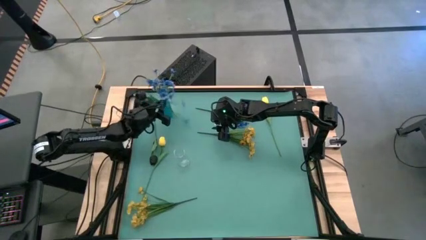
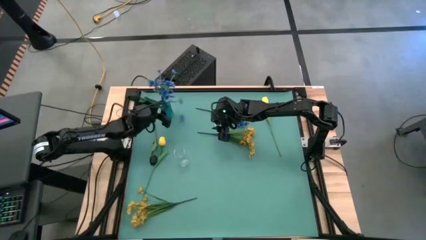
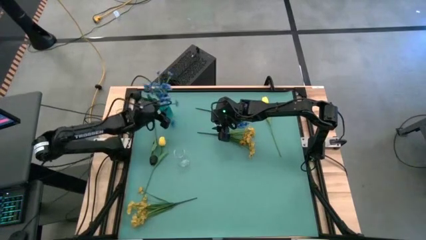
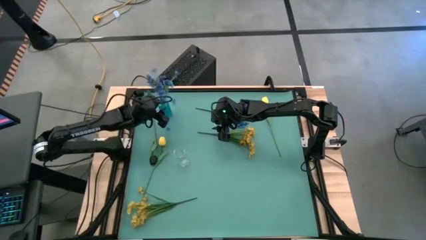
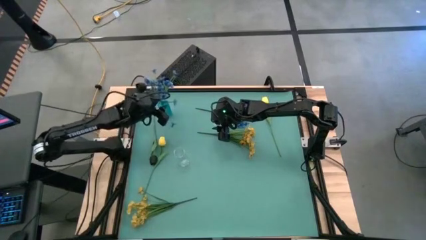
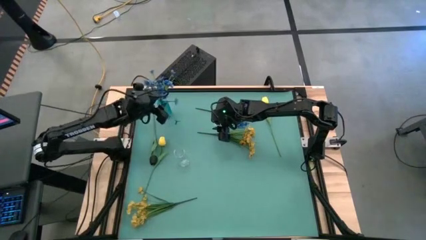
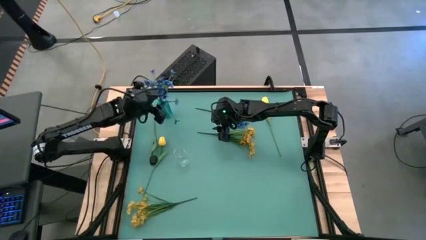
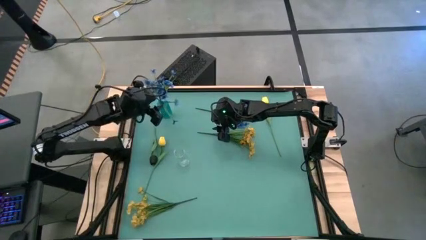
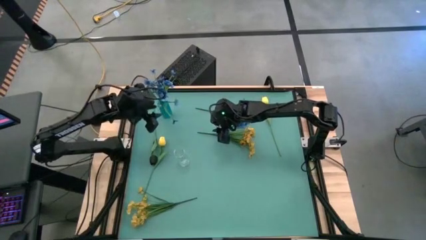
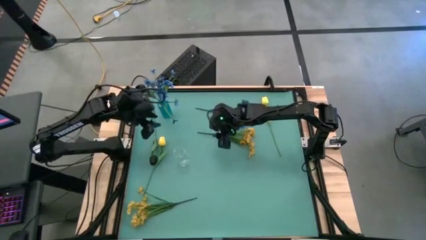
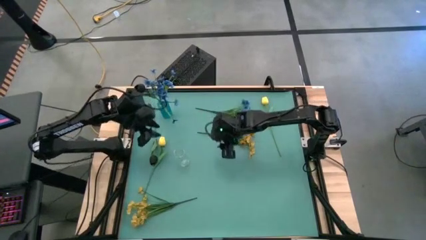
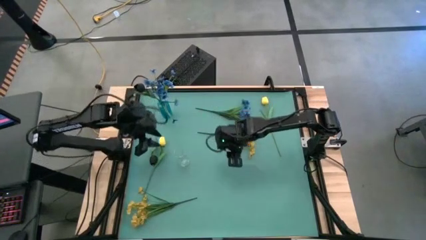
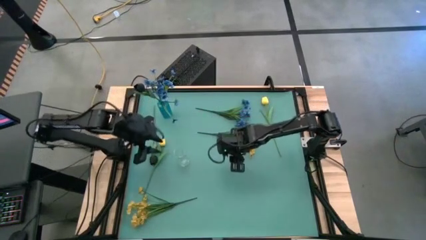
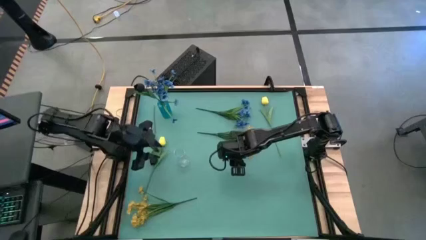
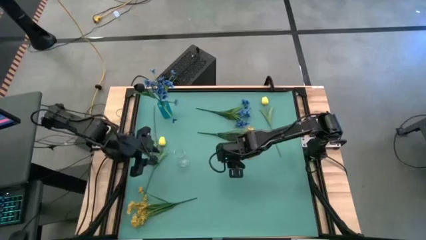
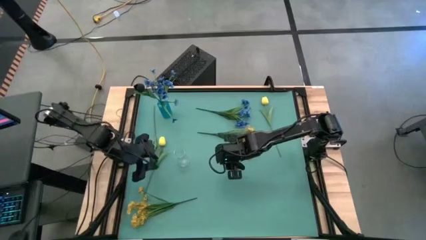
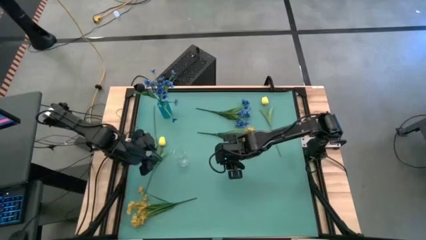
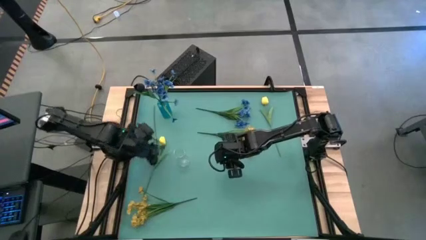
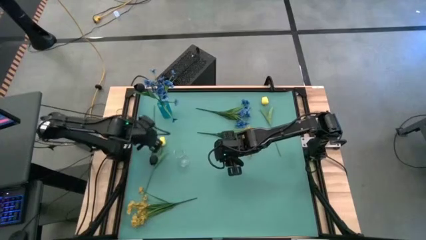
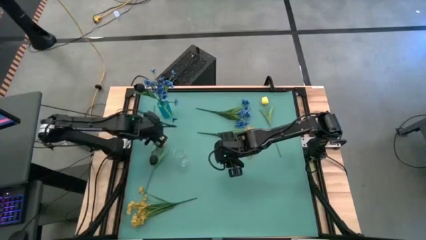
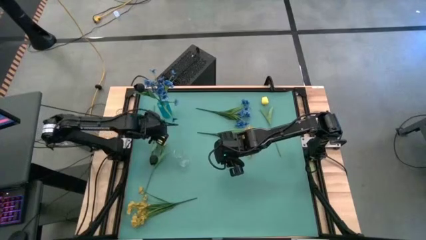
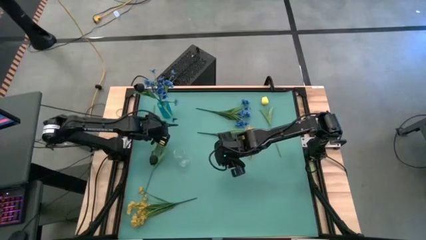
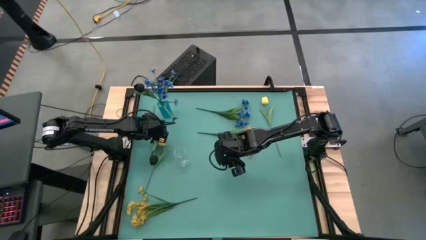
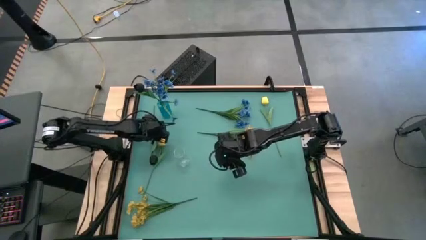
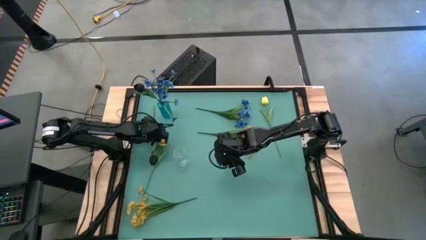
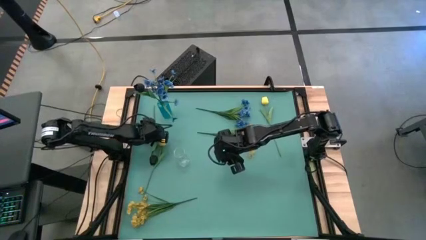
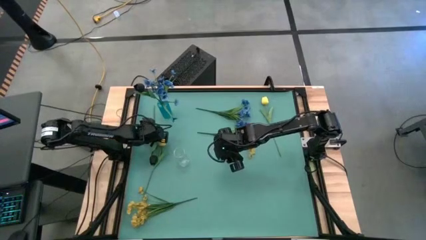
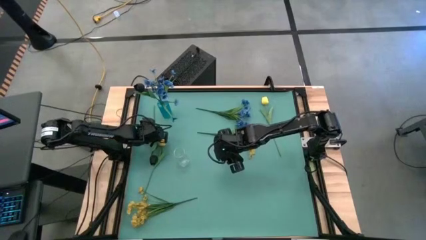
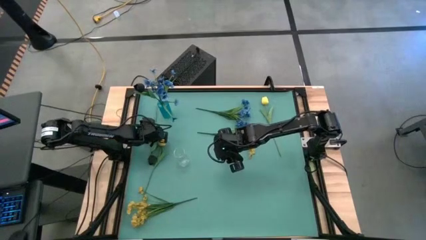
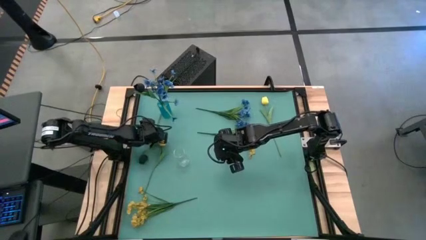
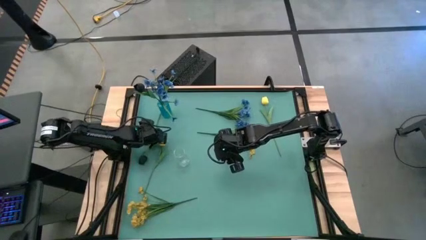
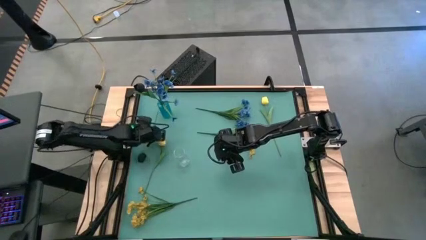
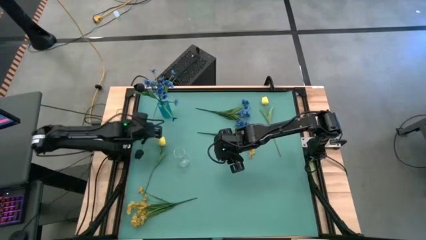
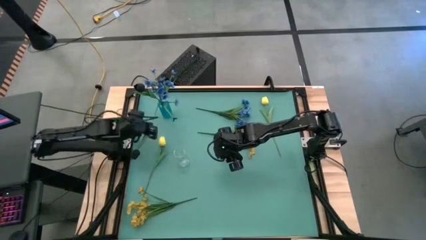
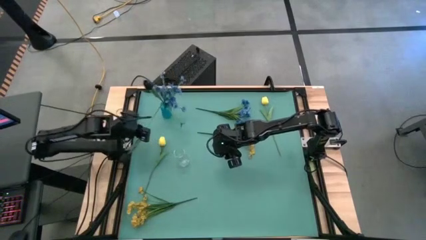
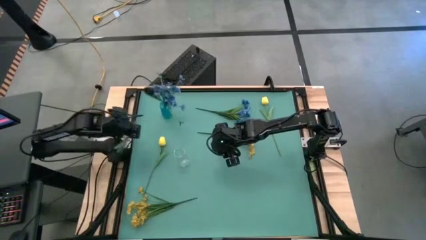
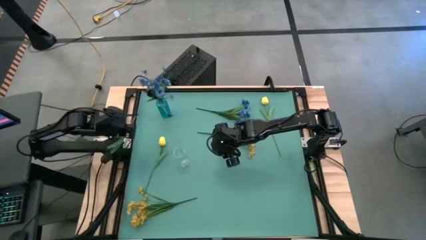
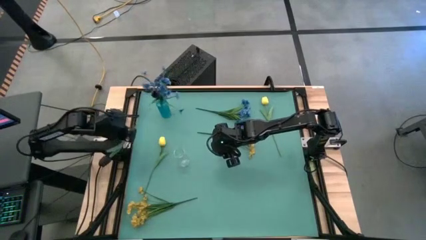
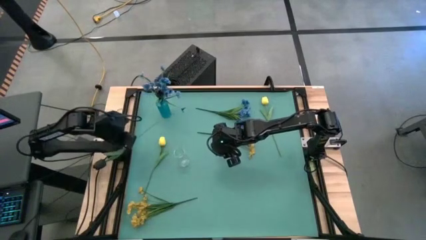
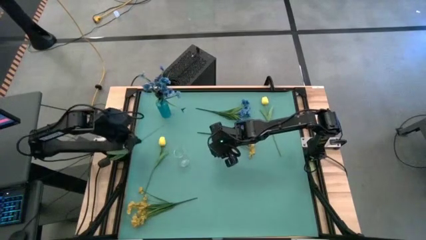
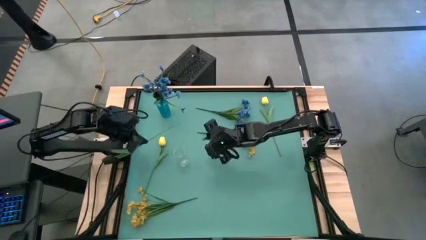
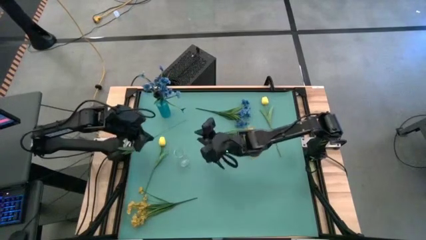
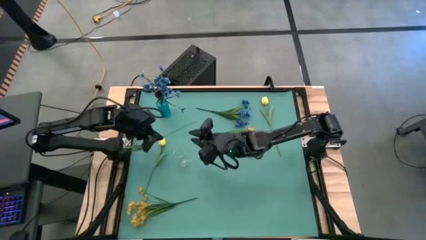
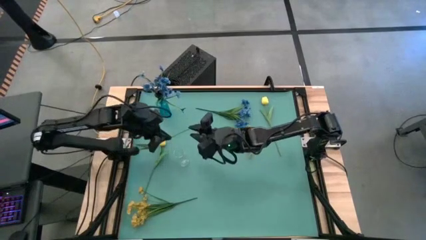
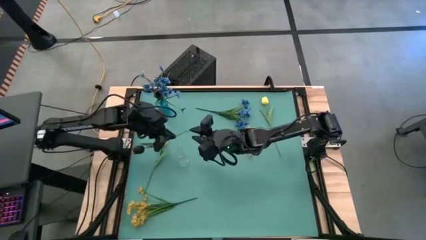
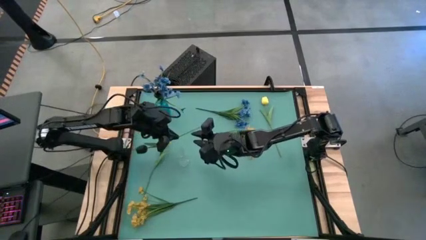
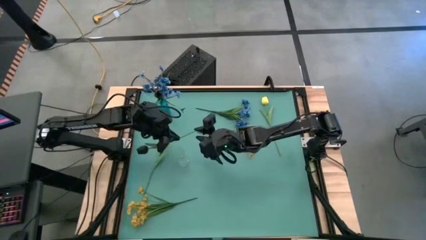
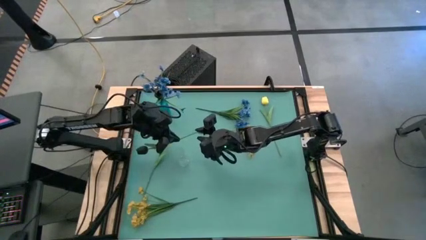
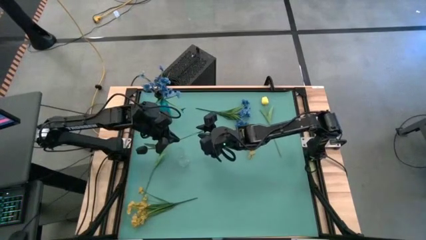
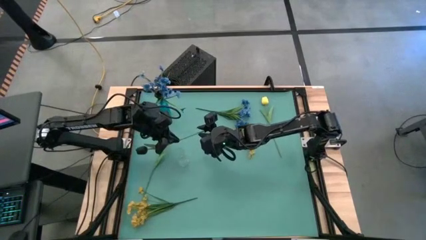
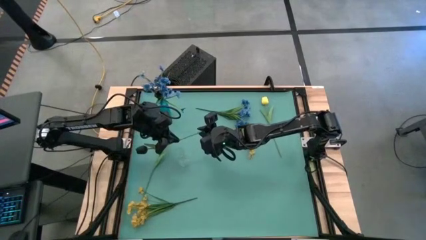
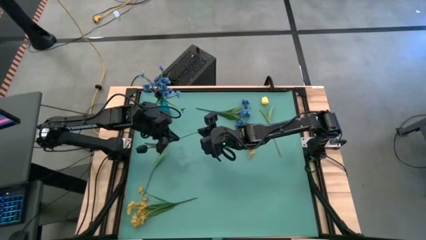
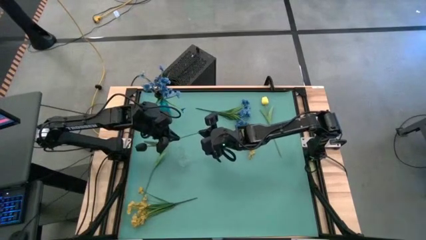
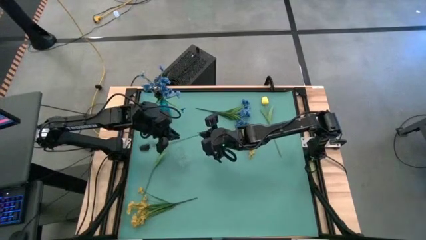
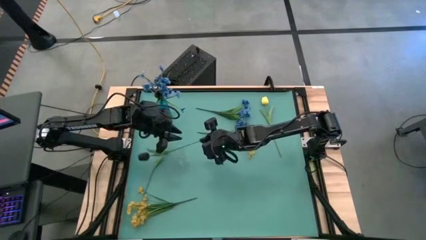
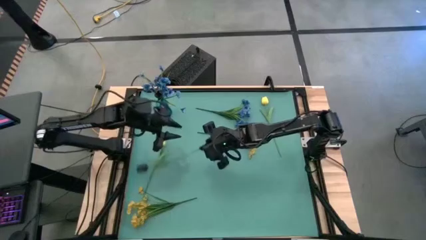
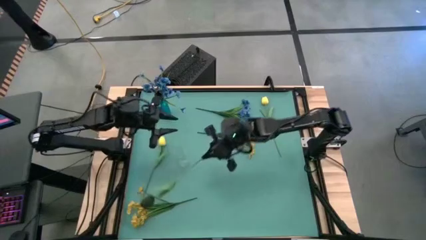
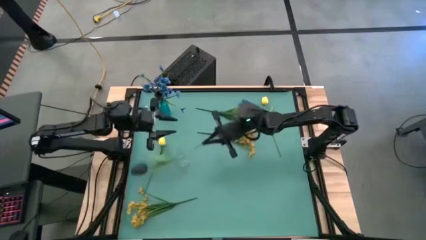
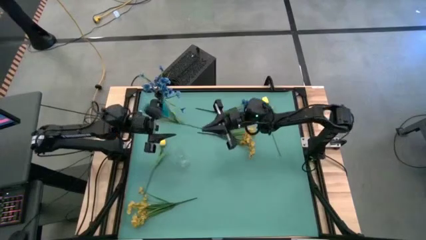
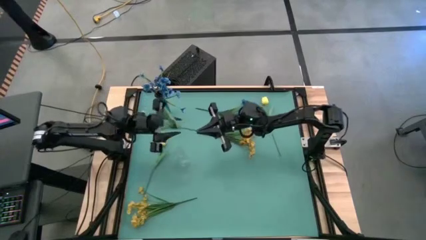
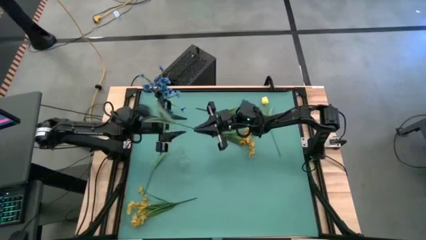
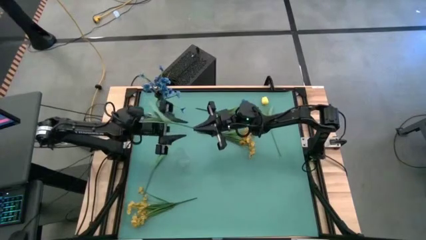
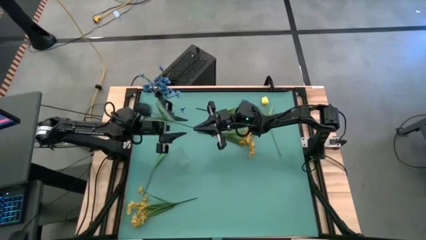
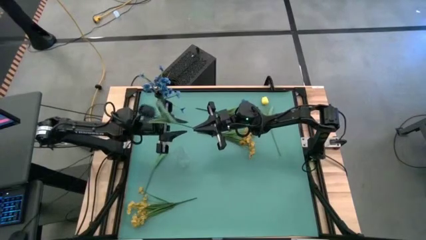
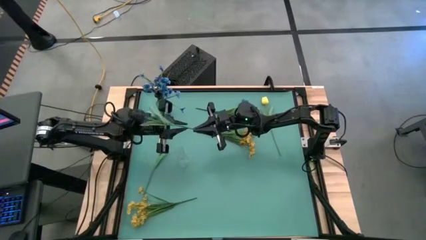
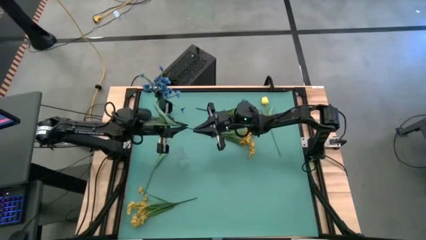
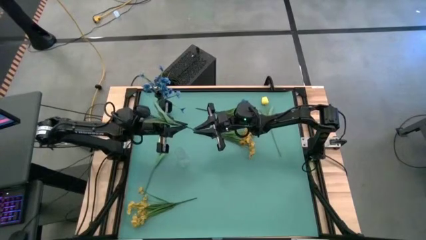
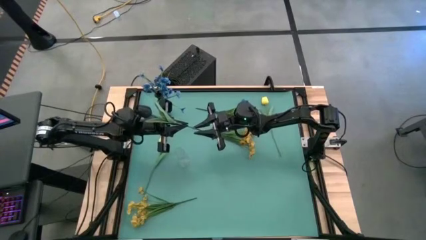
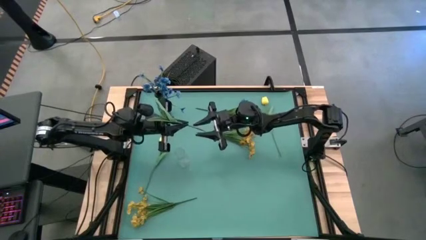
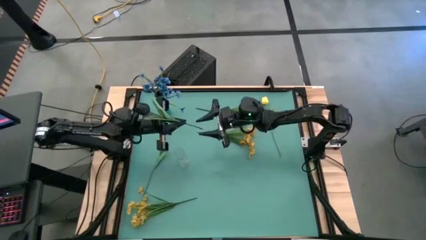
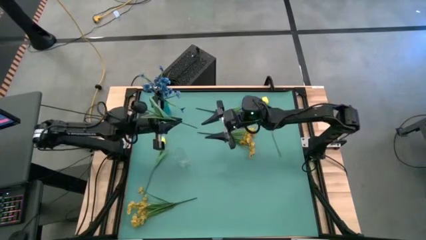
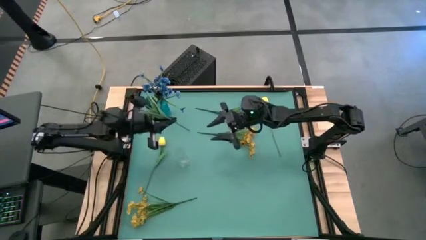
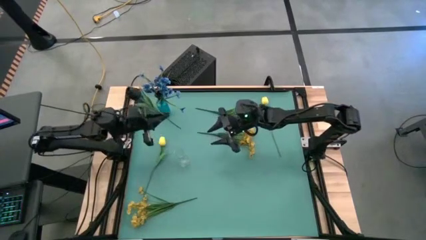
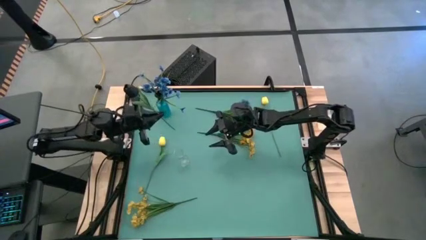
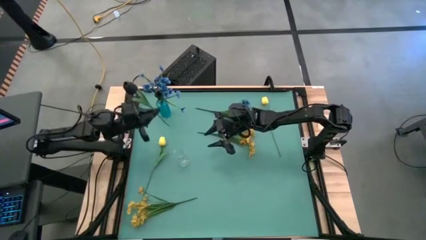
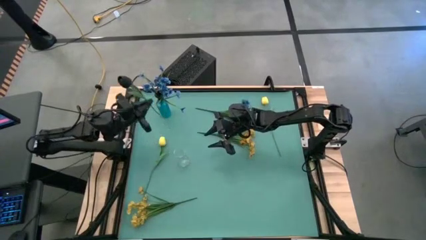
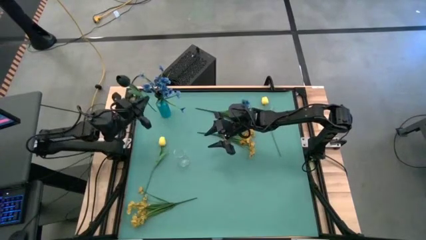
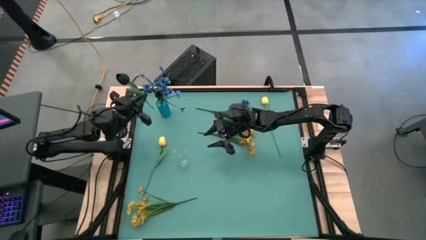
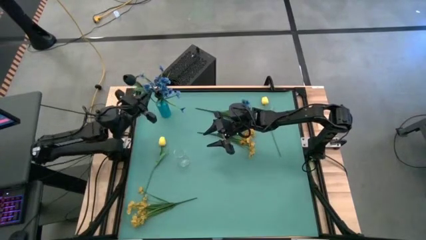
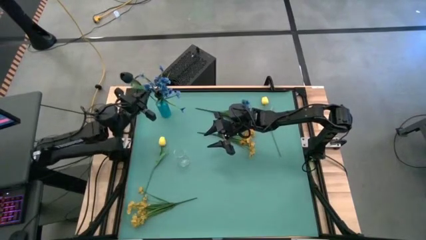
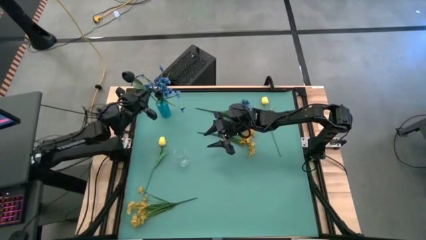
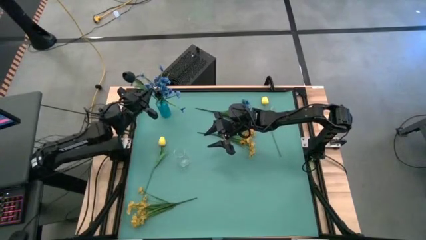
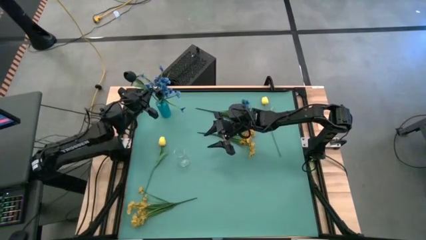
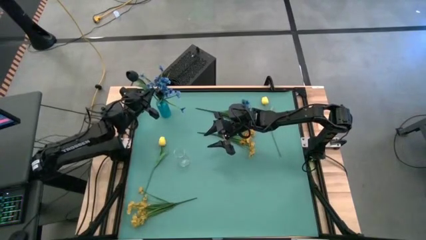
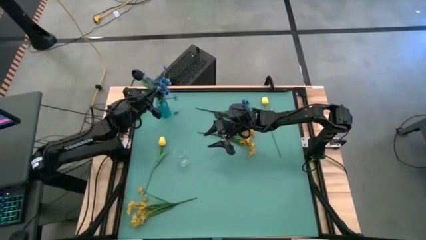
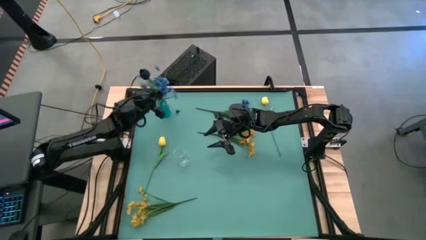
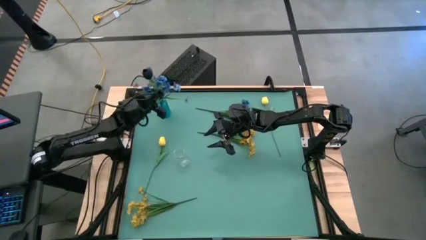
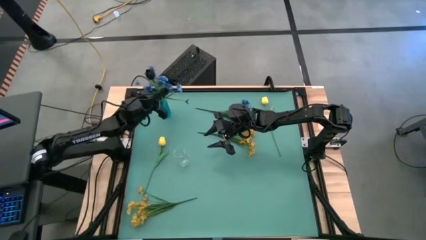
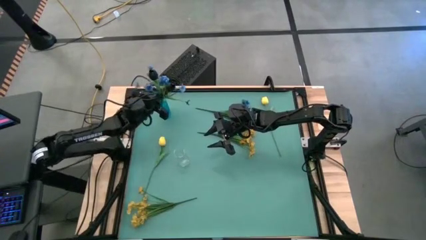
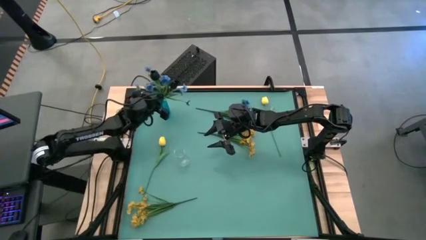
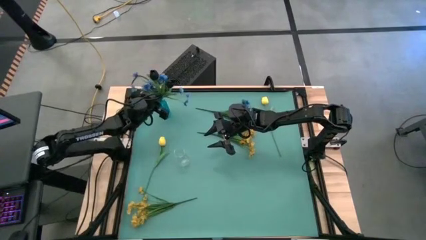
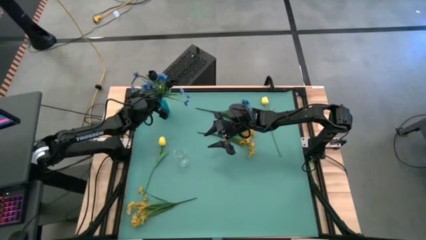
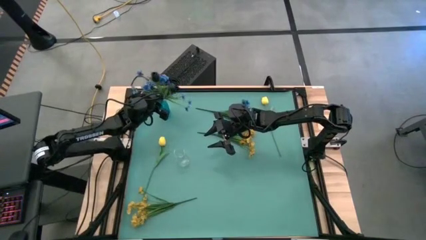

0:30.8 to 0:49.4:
Task: Sort flowers into vase by color
Put the black flower into the blue vase
